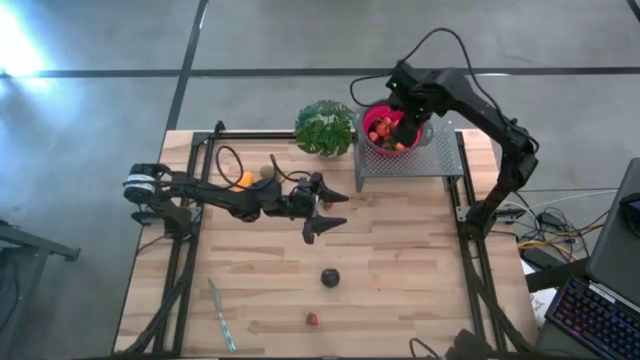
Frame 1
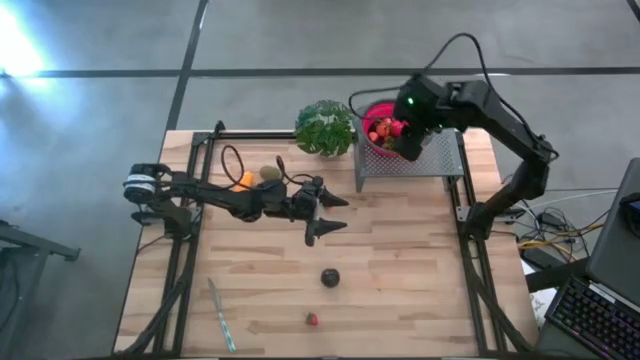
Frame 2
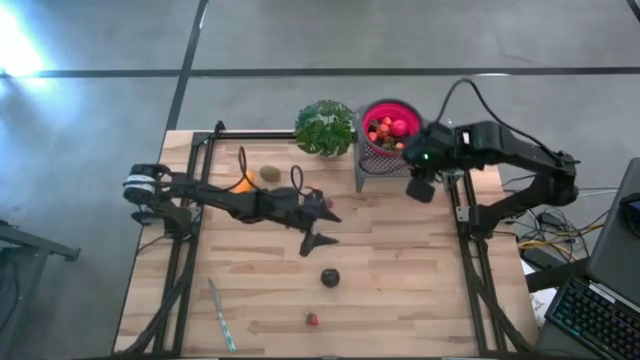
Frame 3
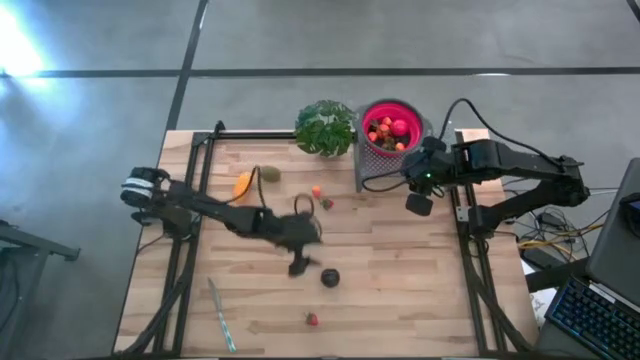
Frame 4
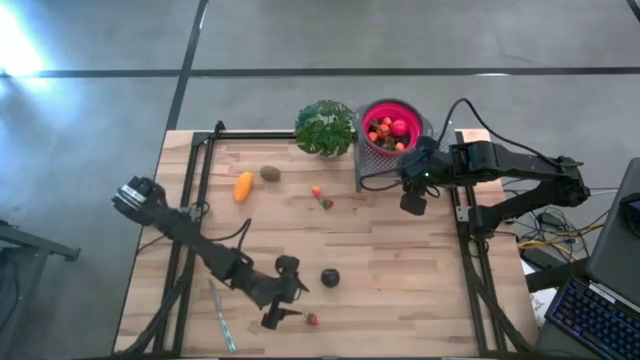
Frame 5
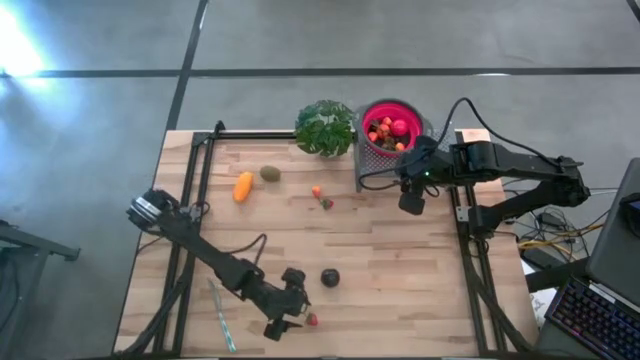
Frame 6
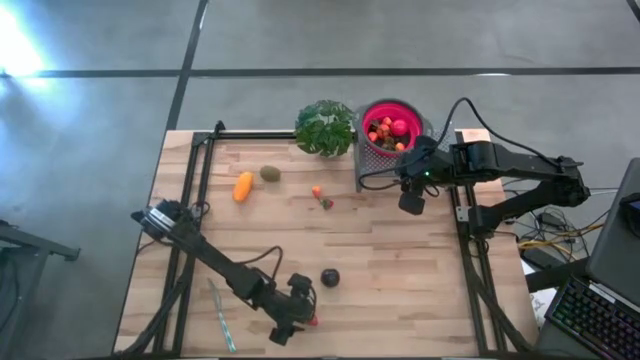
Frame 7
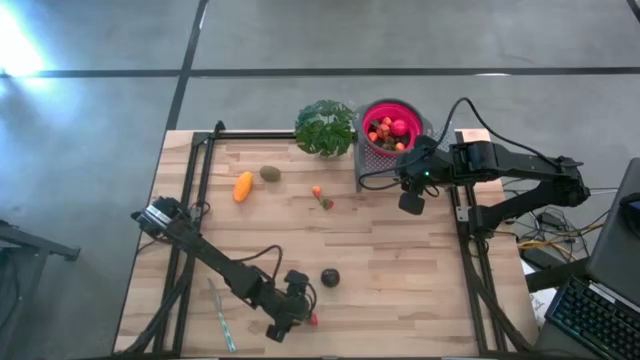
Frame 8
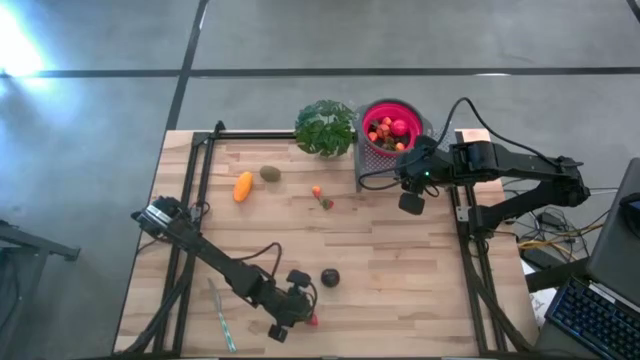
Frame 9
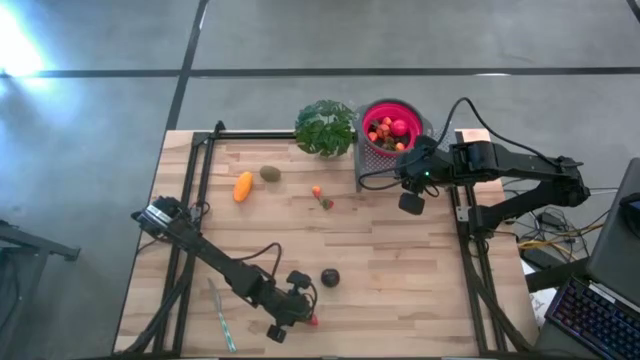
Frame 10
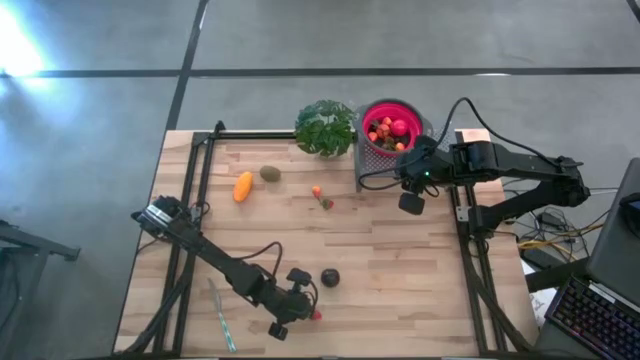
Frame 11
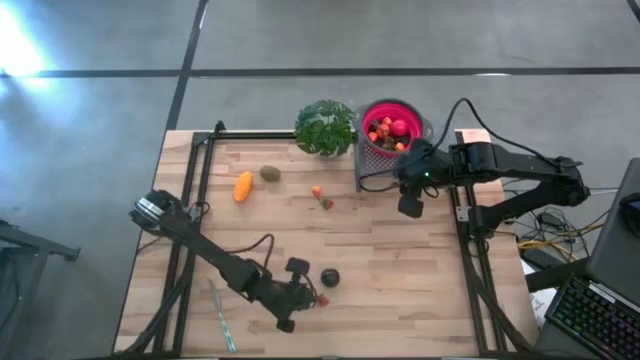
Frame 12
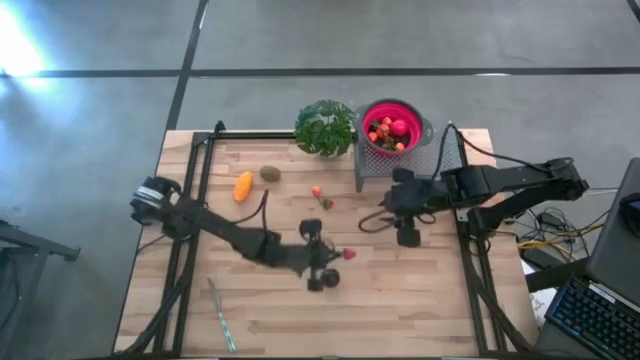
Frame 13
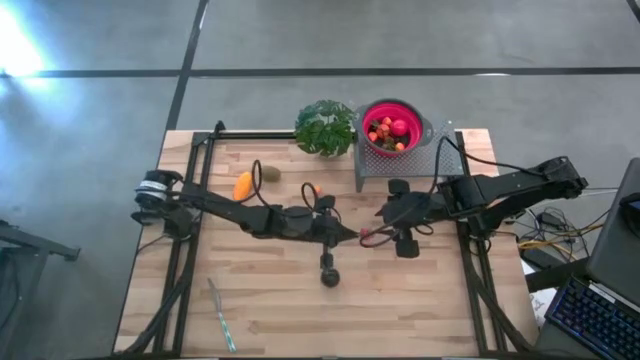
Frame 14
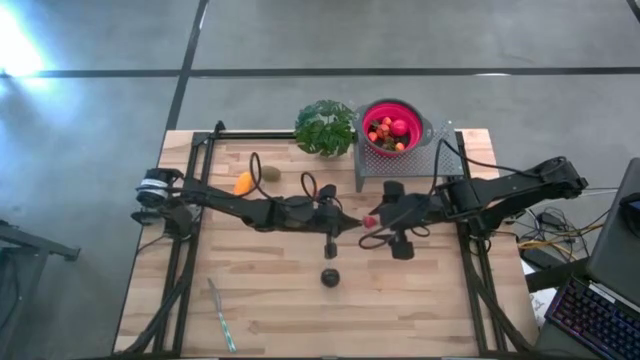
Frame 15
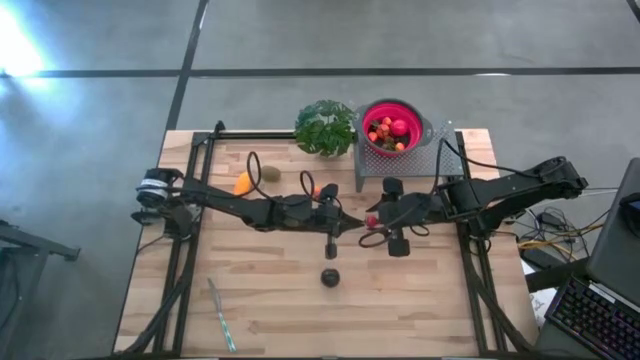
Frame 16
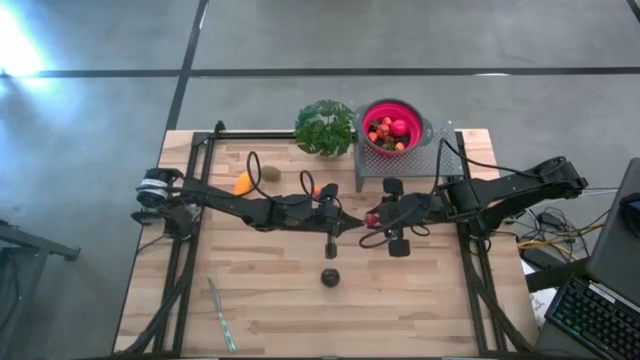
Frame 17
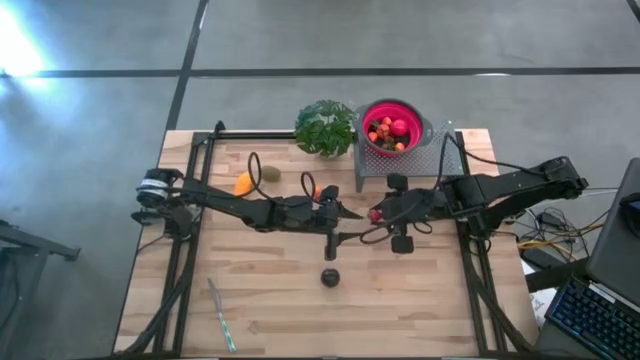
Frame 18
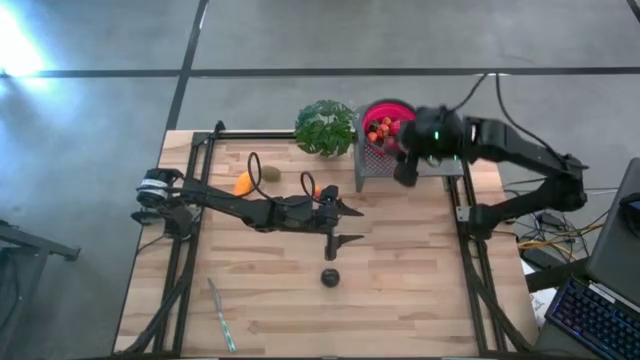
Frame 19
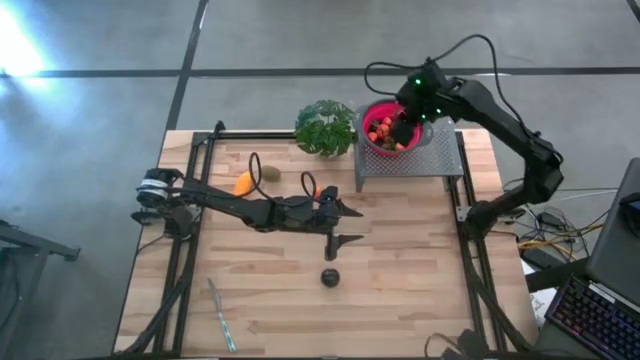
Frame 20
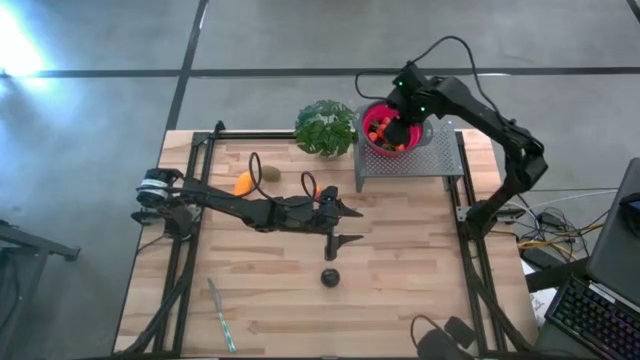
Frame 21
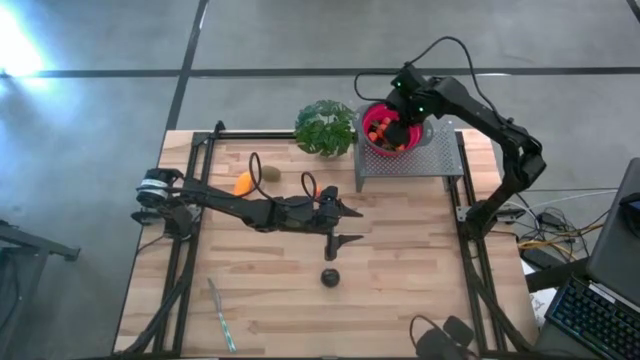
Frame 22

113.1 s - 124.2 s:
Task: Pick & Place Fruit
Put the strawberry into the red strainer bowl on the shelf

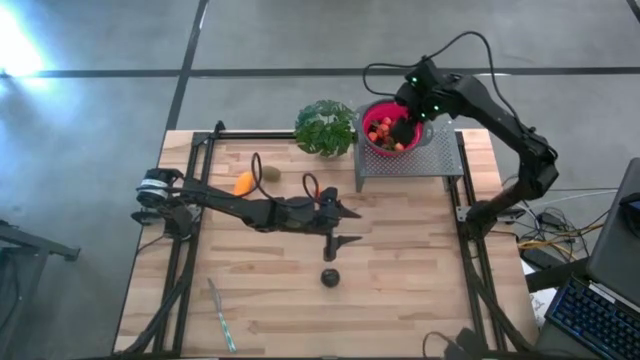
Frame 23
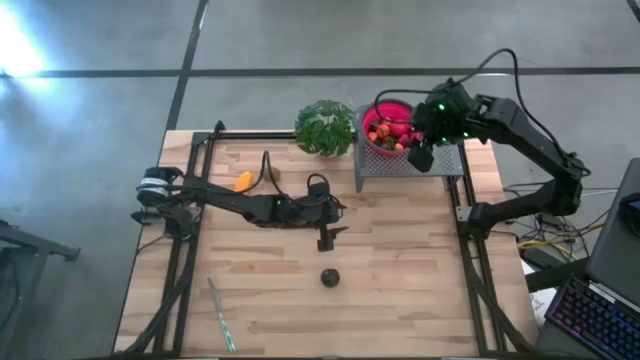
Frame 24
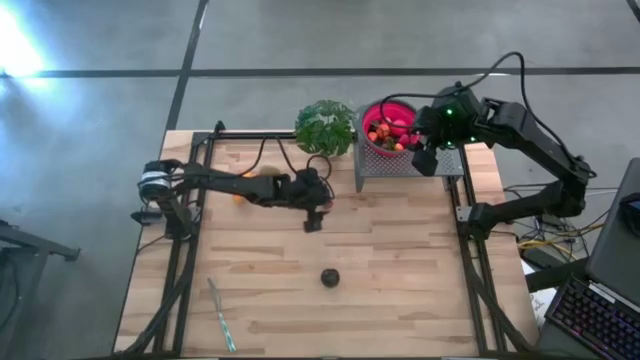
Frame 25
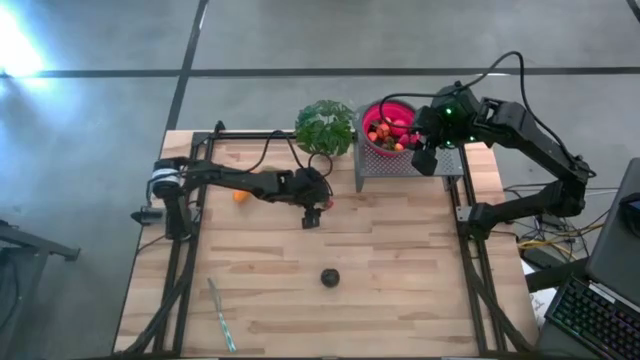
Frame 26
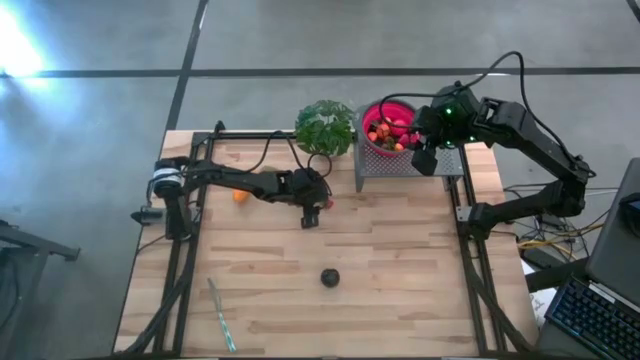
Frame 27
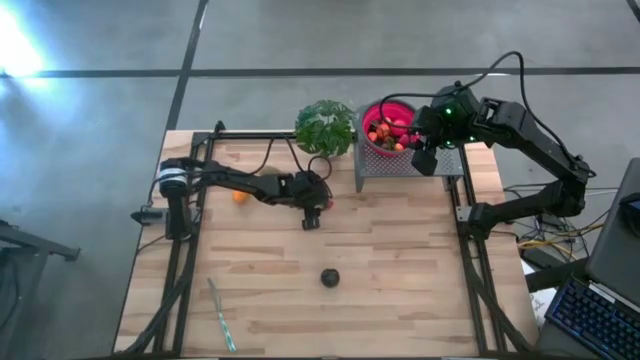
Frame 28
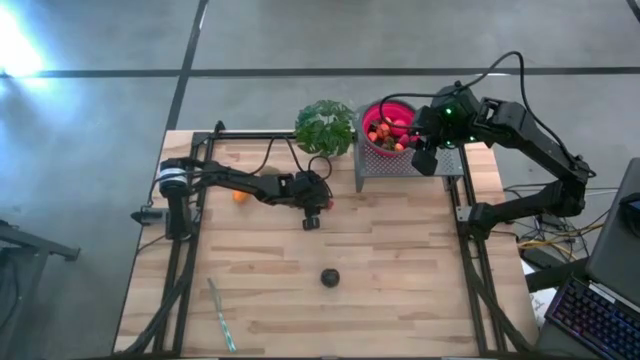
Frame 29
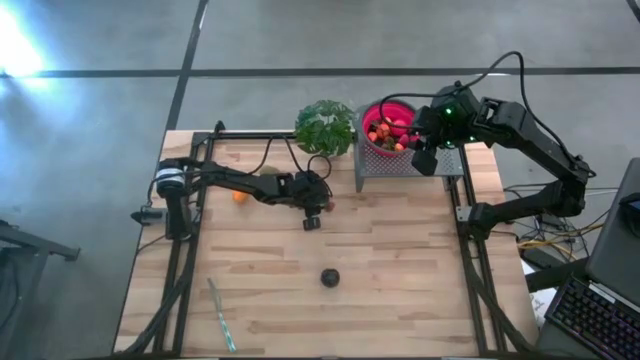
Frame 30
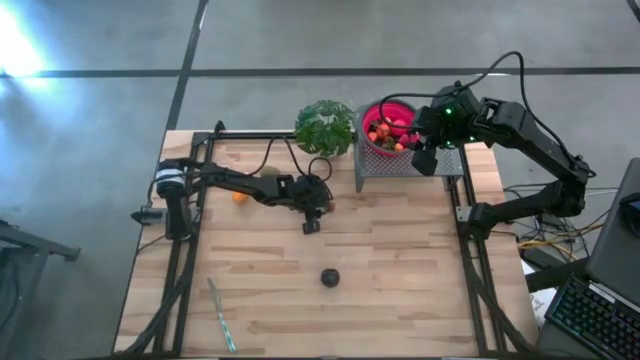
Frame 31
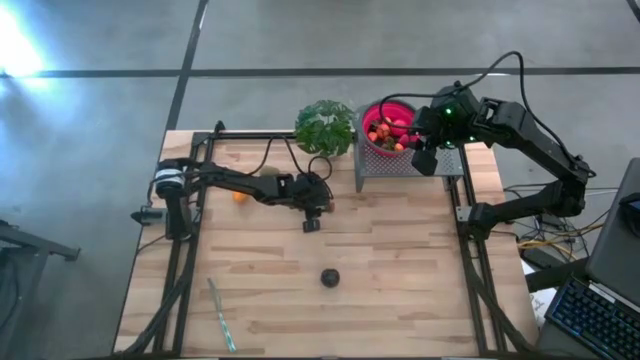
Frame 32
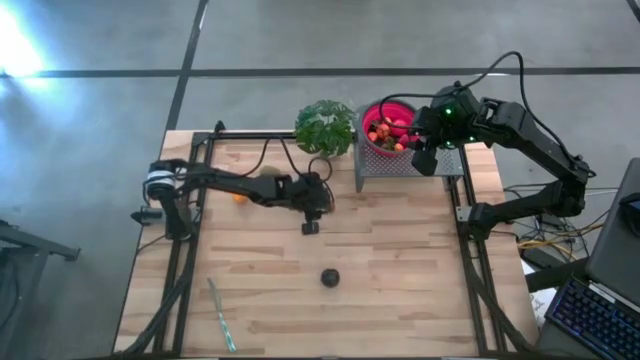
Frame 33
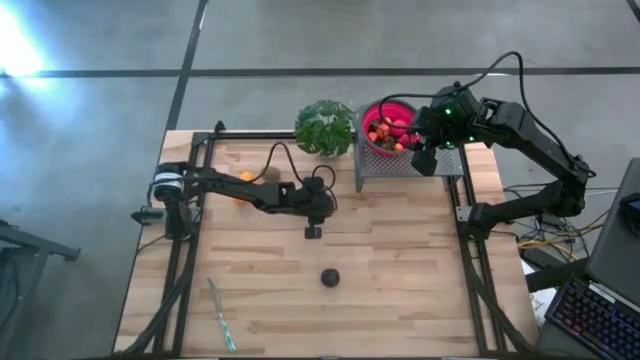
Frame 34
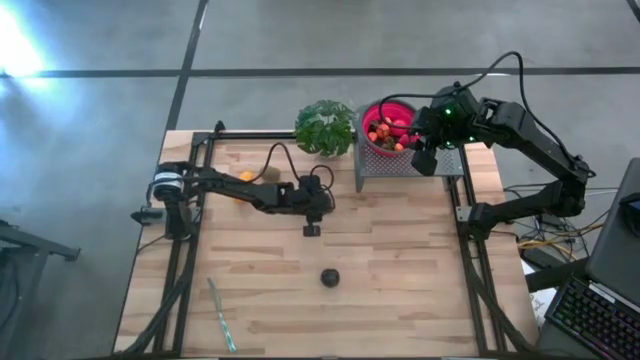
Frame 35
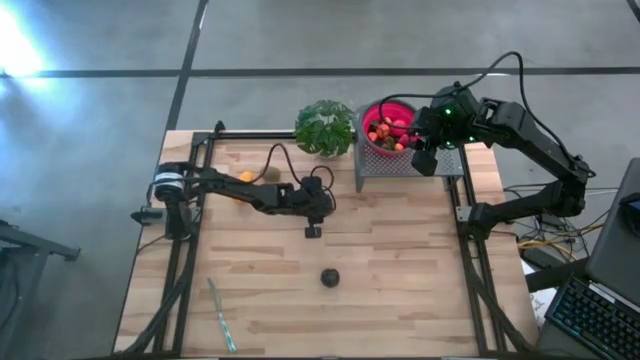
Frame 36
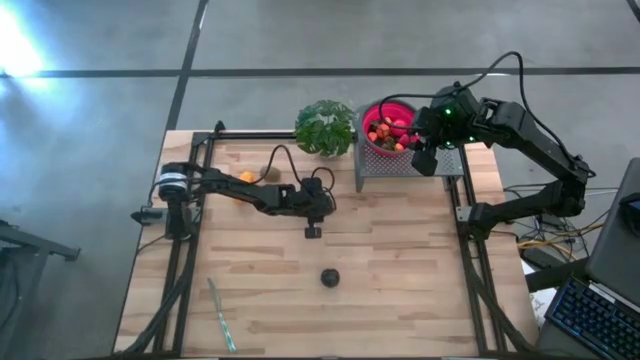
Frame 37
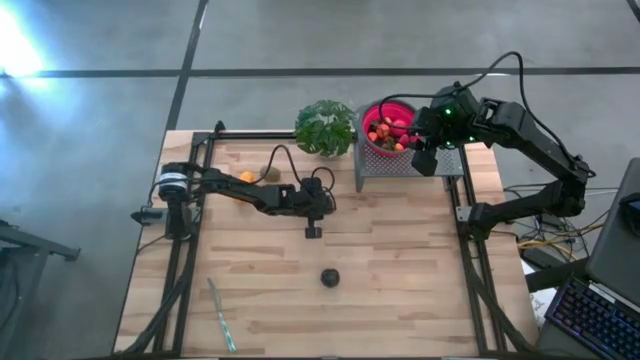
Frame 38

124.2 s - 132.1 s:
Put the strawberry into the red strainer bowl on the shelf

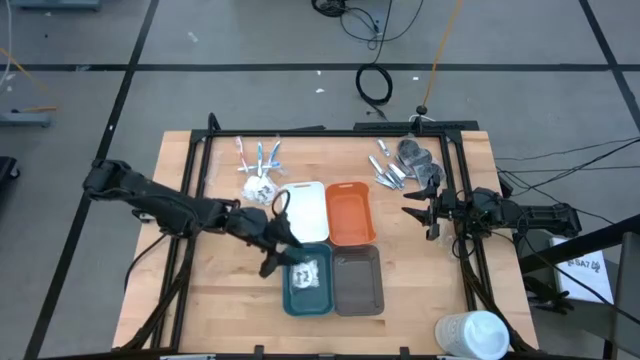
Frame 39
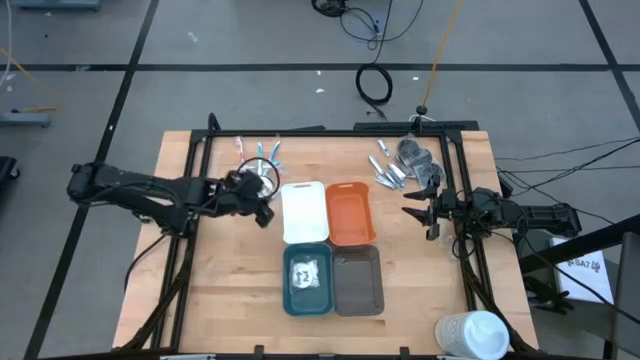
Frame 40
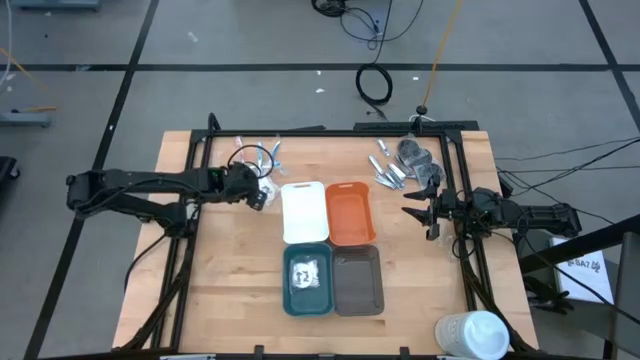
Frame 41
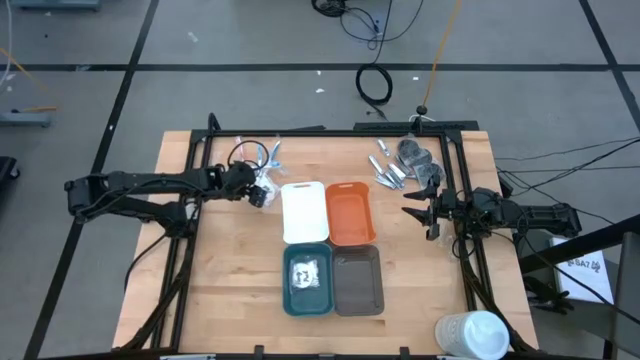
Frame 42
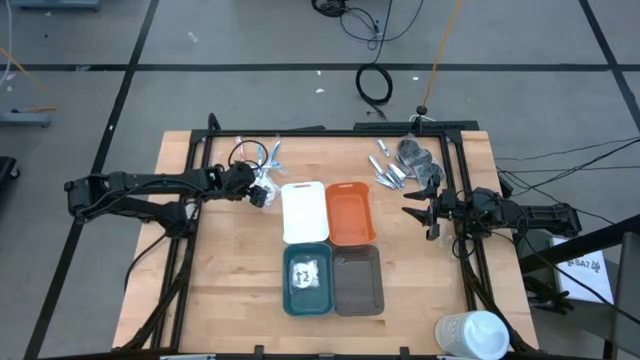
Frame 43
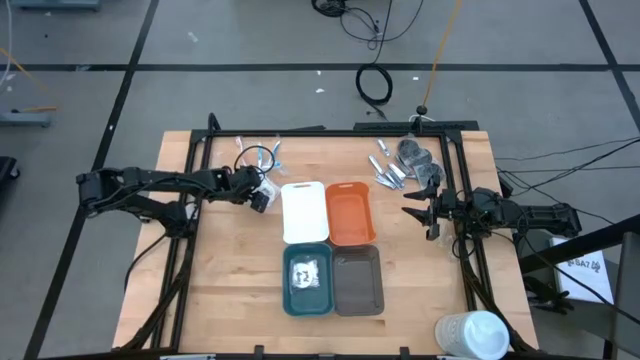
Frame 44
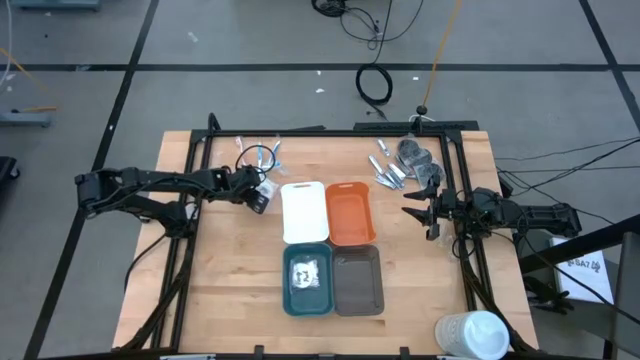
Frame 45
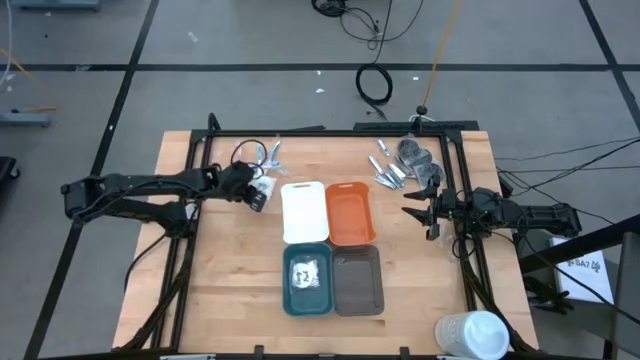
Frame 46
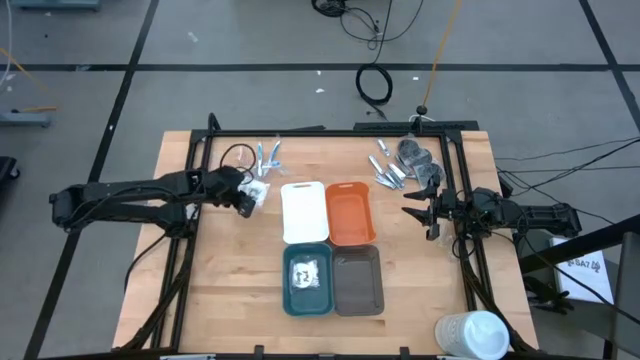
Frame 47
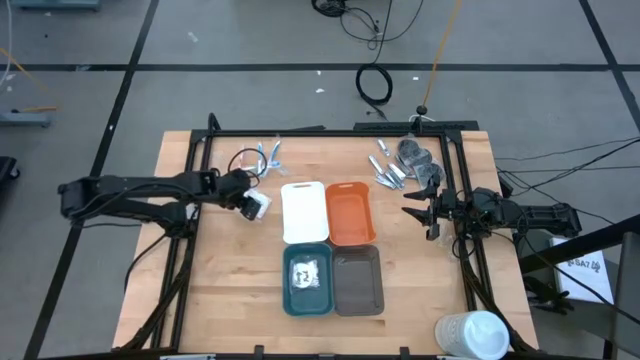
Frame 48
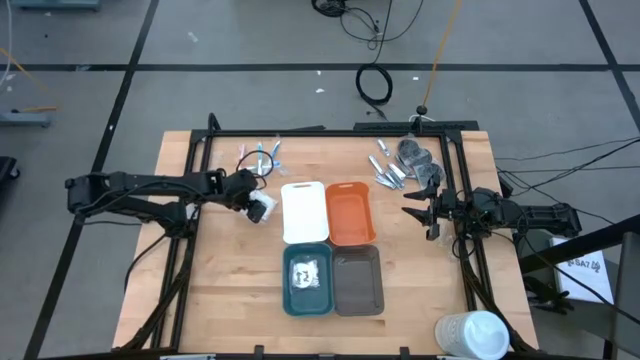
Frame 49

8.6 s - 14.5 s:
Task: Pick & Place Travel size toiletries
Put the right vanity pack into the blue bin
